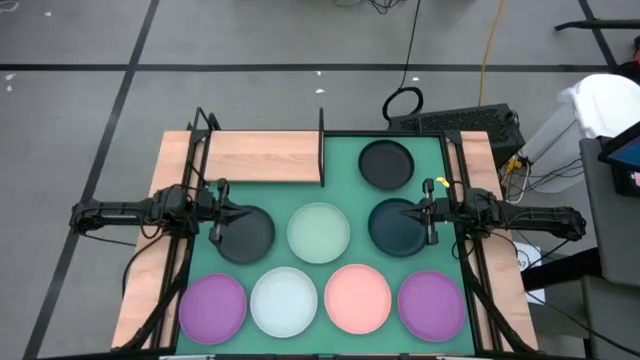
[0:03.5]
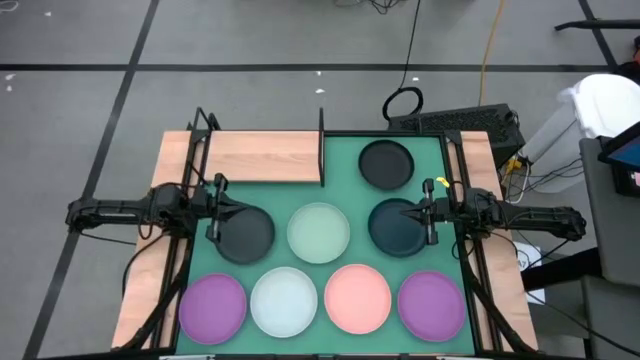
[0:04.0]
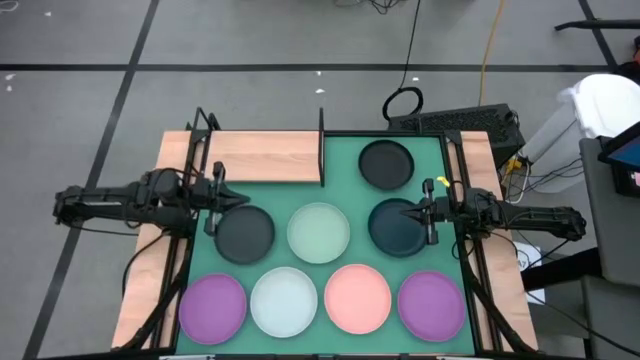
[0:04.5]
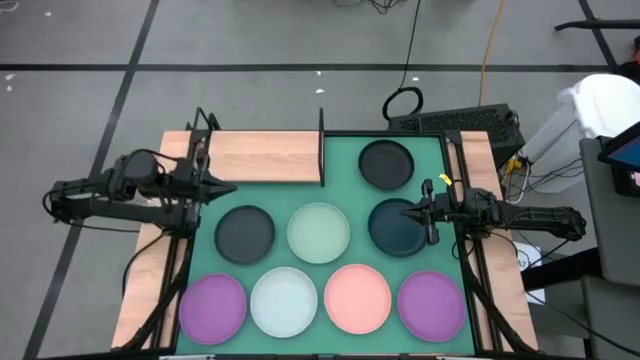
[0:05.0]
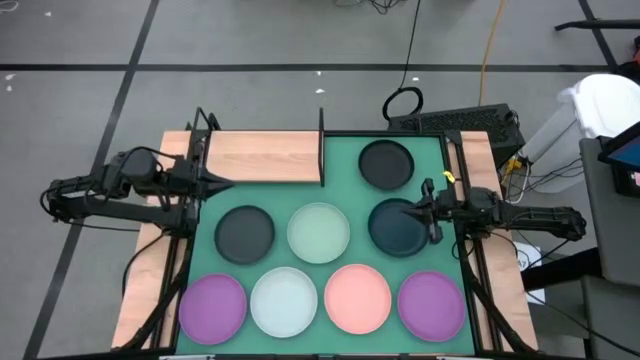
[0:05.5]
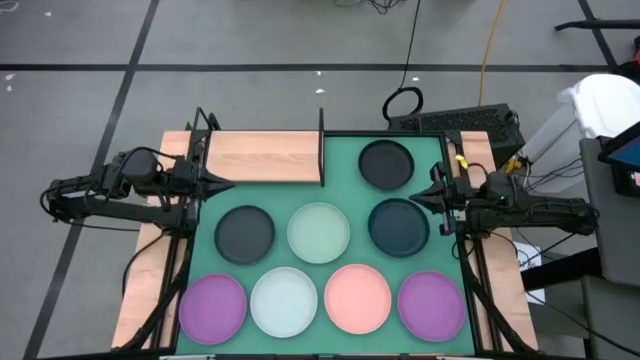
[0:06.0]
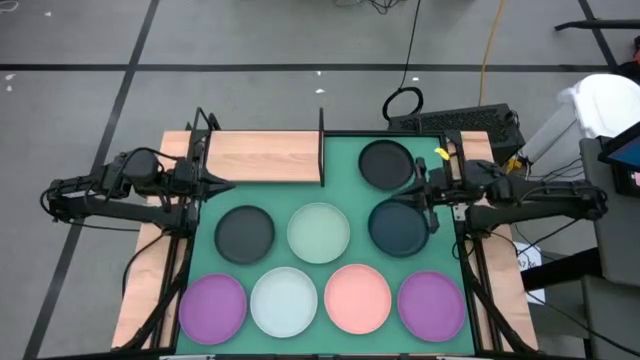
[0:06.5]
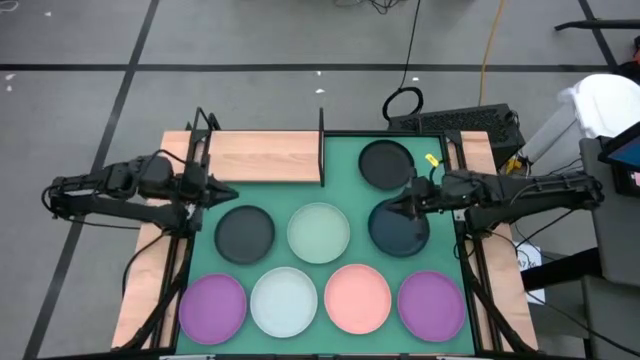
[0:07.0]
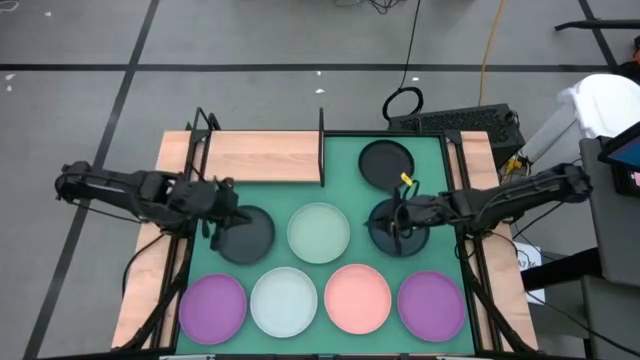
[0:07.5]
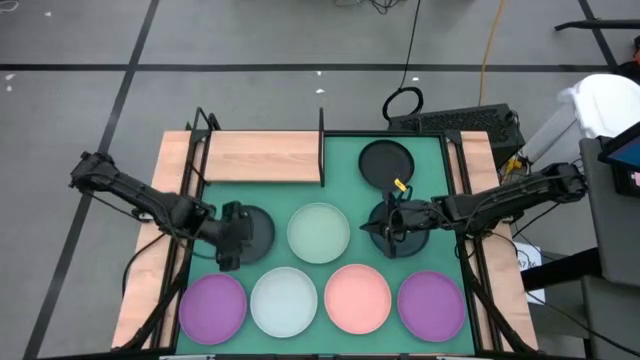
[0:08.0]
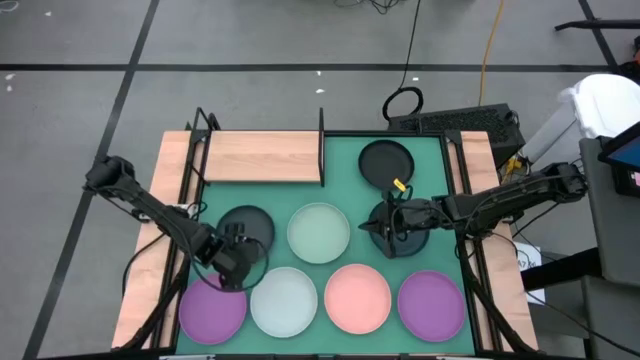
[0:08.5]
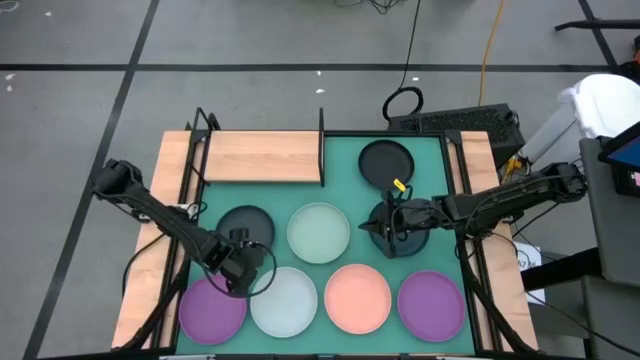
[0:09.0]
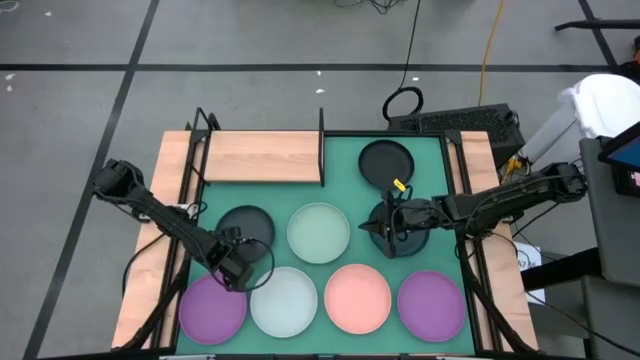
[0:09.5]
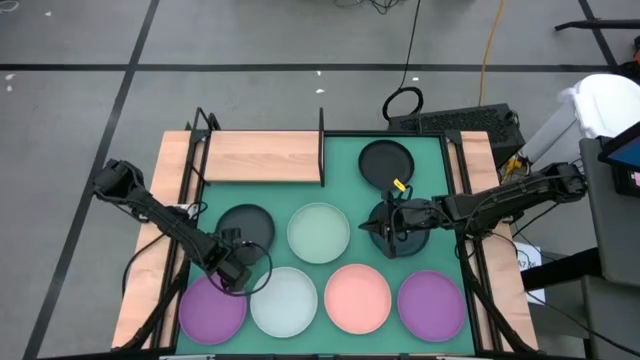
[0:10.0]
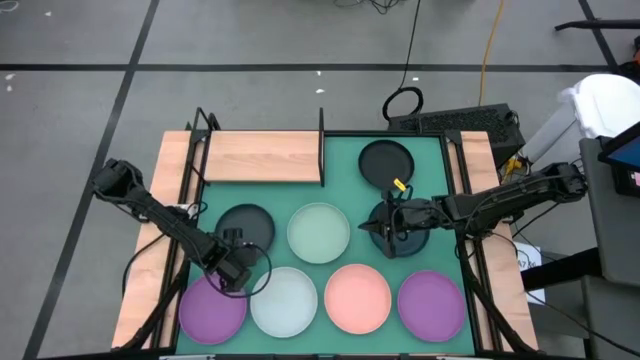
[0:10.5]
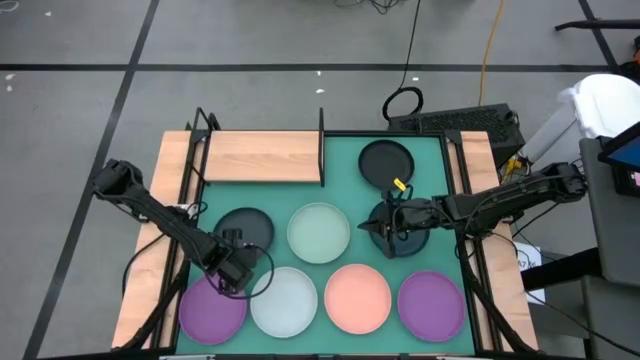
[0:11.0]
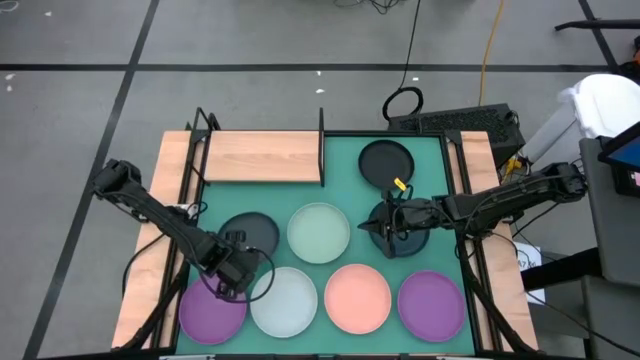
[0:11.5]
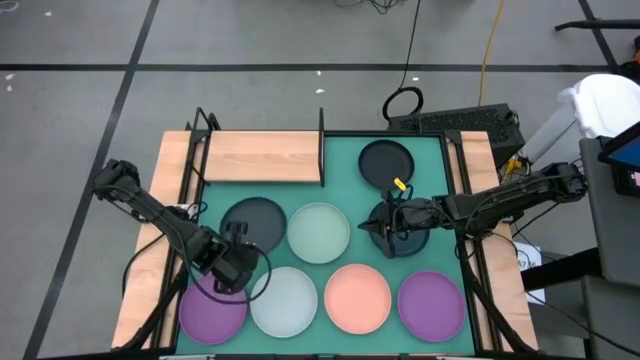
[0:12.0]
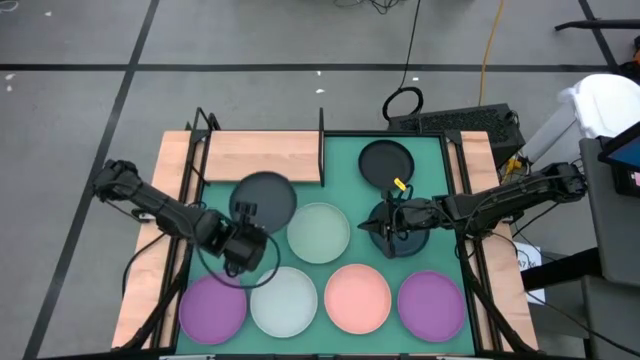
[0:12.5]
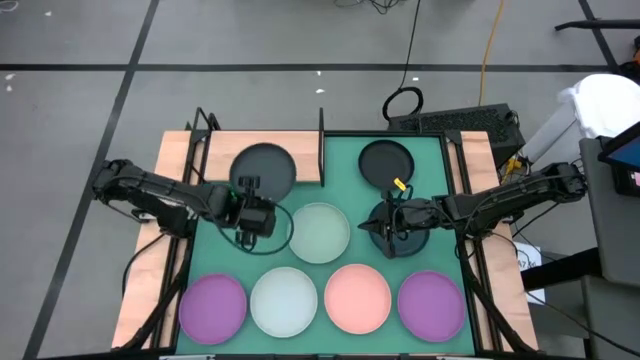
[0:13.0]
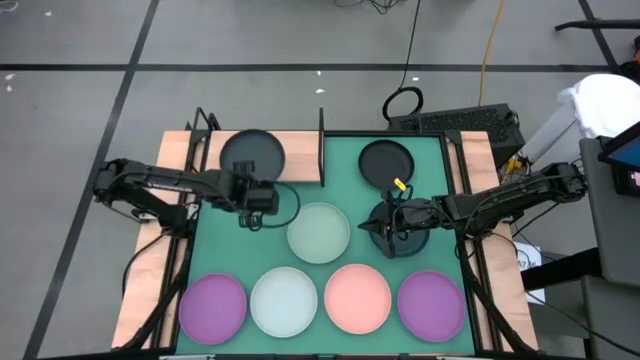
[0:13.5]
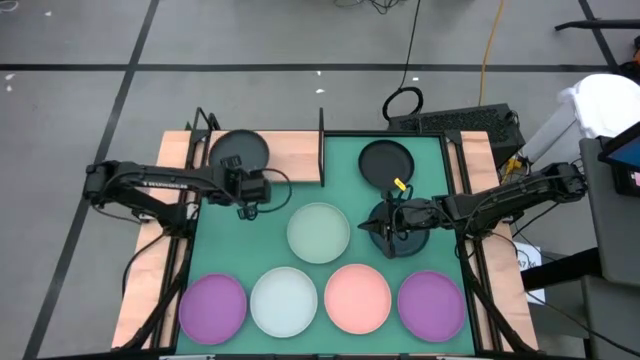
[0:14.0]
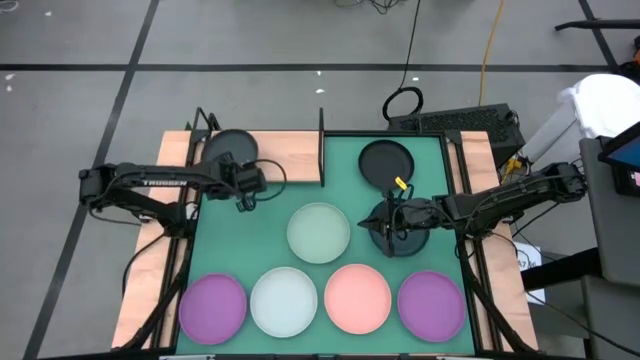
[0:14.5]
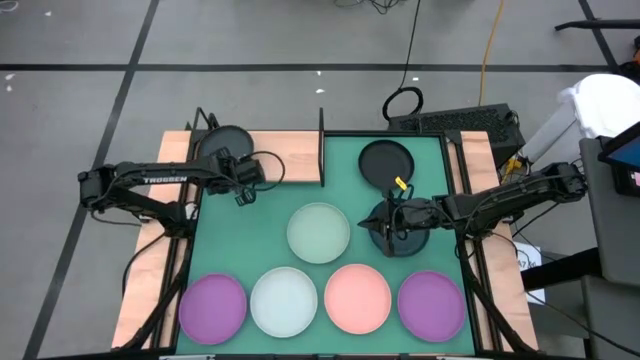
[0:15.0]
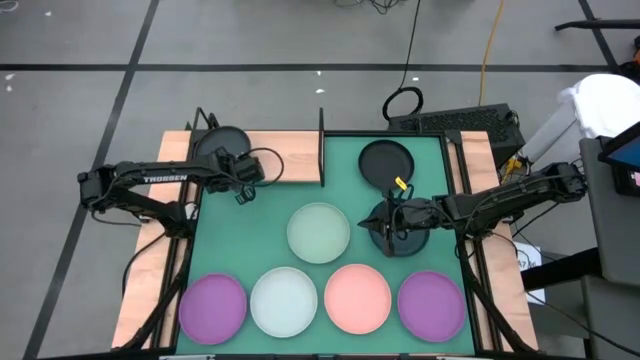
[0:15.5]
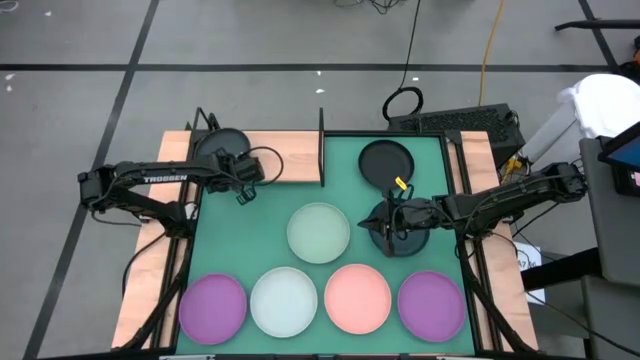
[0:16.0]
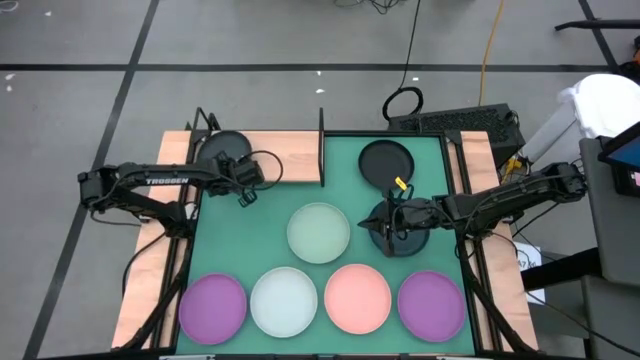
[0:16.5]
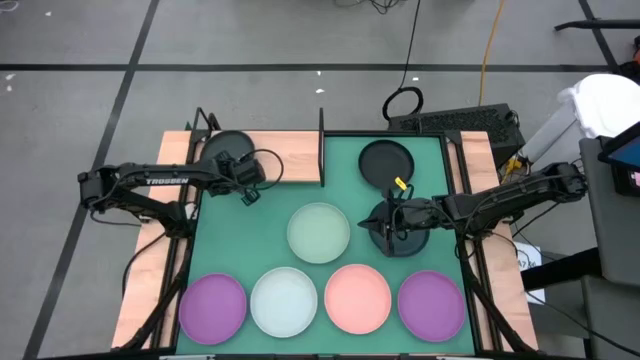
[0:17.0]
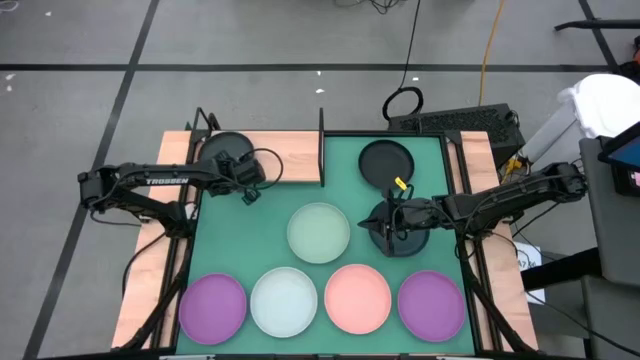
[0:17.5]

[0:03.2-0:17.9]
Task: Place and stack plates onto a shelf
Put the left black plate on the shelf

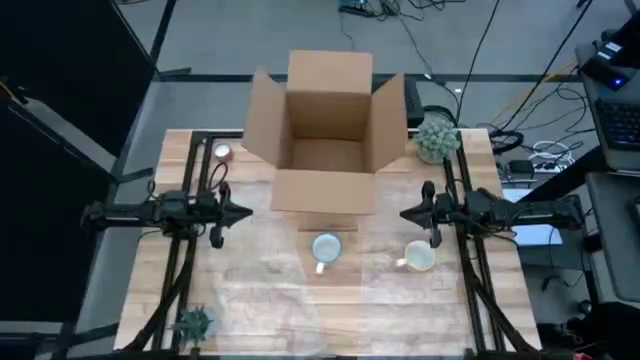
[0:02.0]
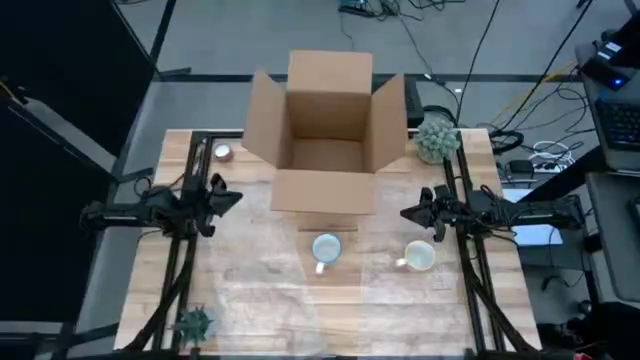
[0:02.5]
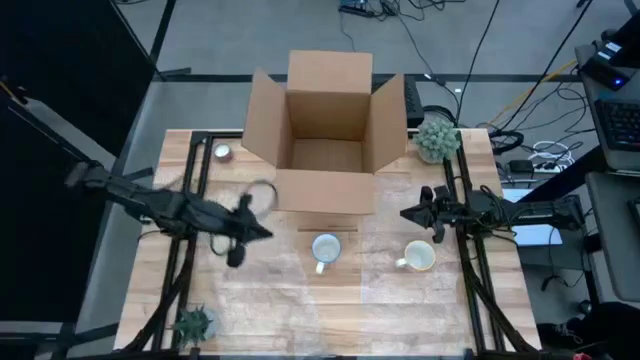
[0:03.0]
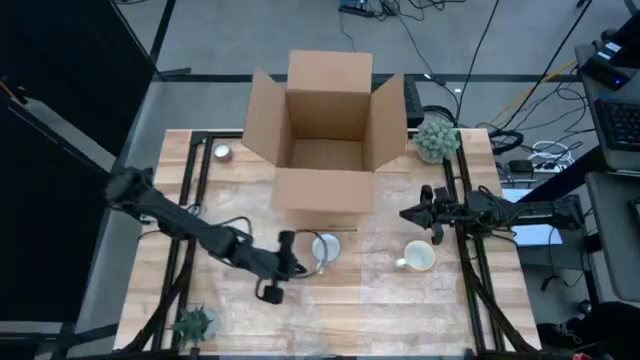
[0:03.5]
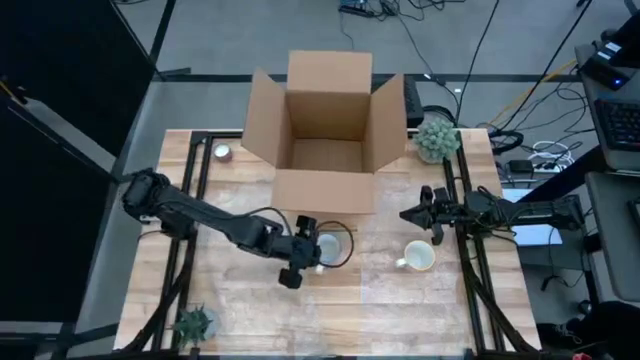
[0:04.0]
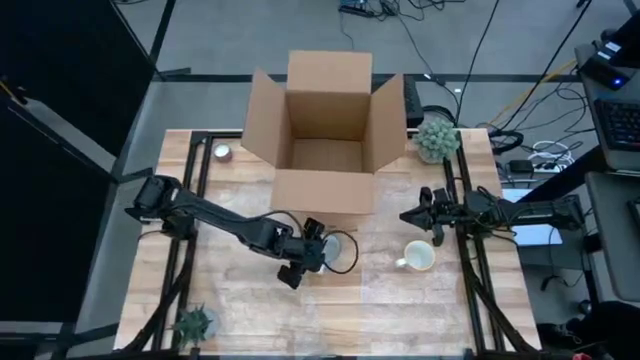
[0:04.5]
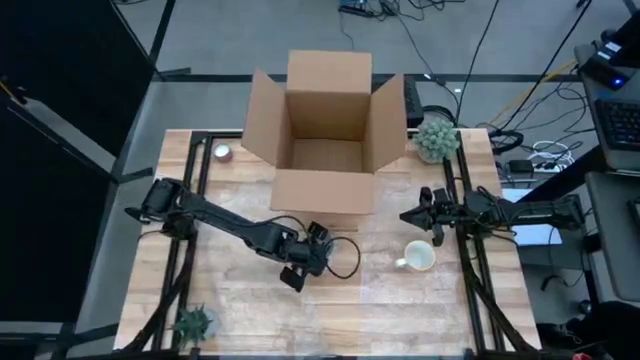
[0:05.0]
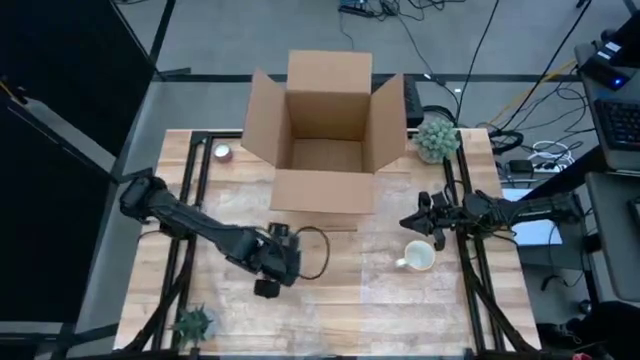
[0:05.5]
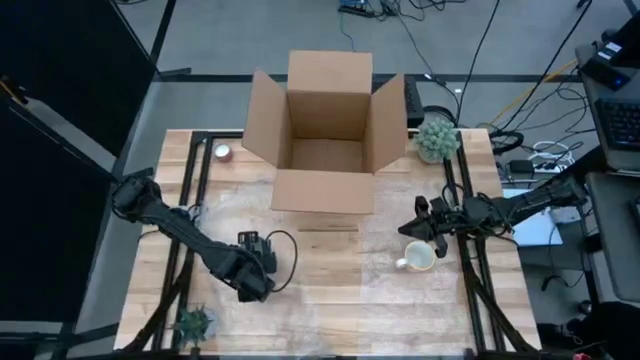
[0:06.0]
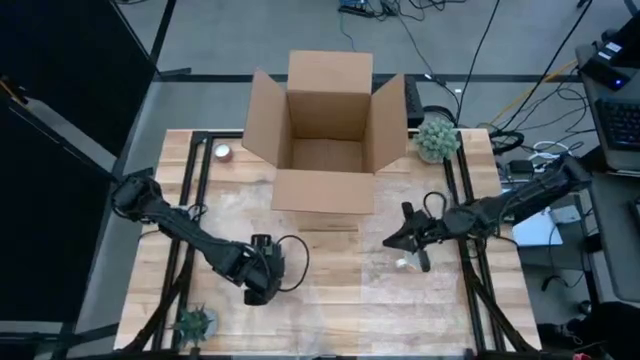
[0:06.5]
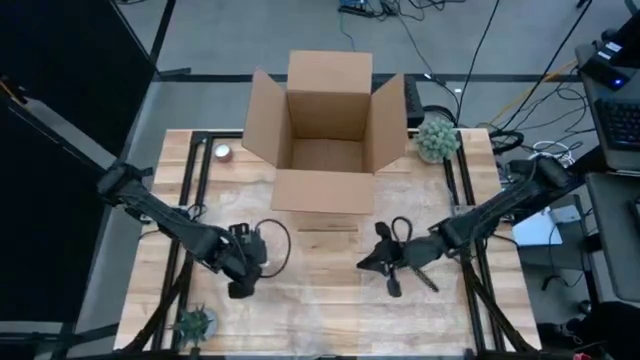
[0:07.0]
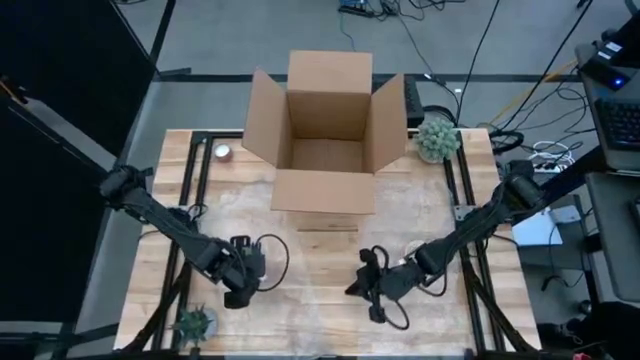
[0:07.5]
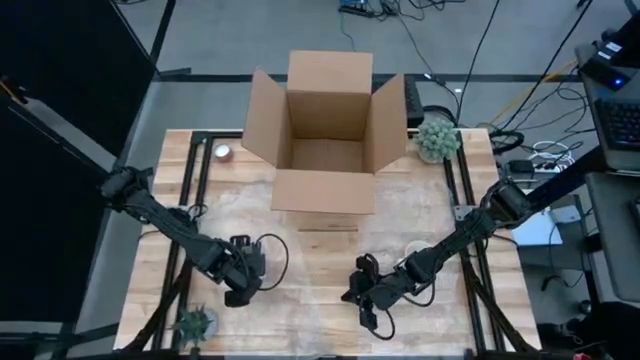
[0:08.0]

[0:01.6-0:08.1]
Task: wrap mug
Put the red cup on the left transparent bubble wrap
